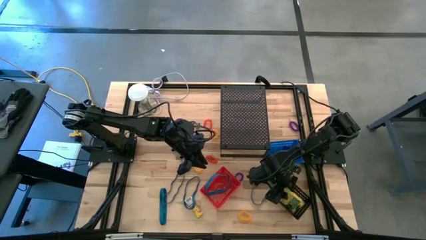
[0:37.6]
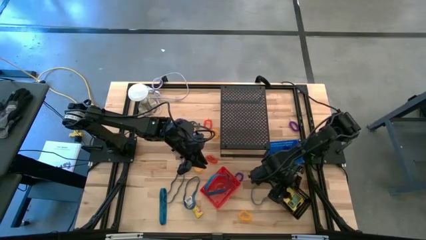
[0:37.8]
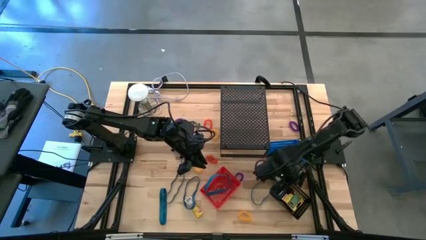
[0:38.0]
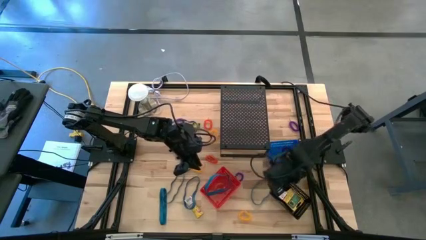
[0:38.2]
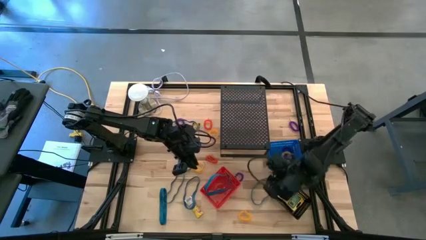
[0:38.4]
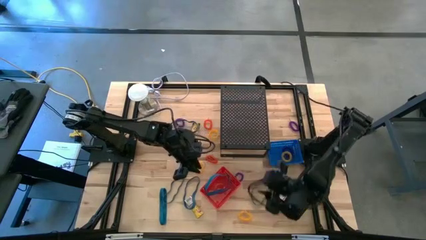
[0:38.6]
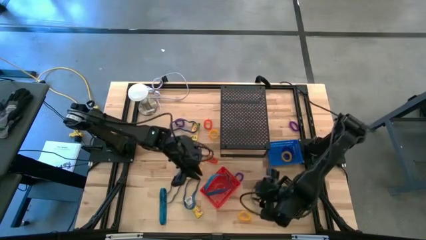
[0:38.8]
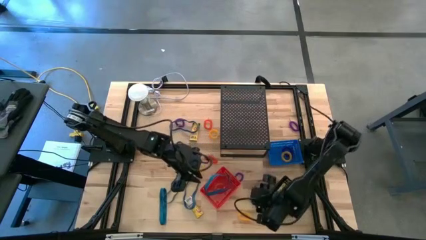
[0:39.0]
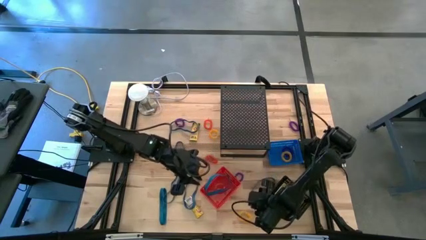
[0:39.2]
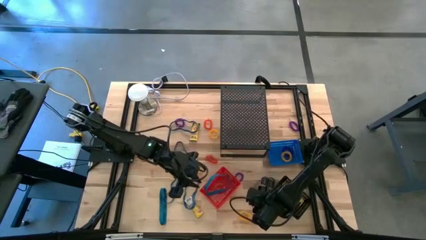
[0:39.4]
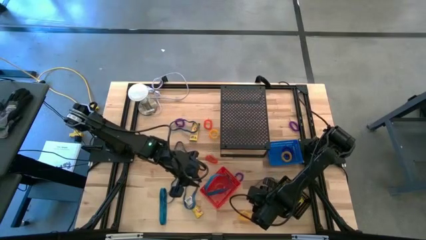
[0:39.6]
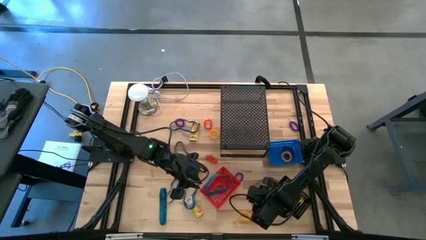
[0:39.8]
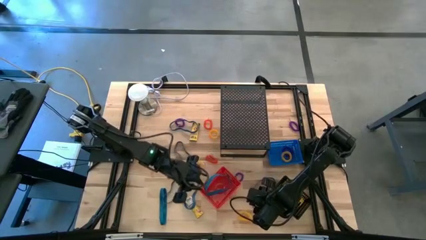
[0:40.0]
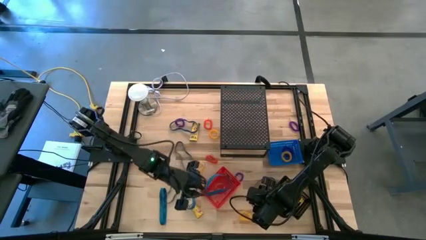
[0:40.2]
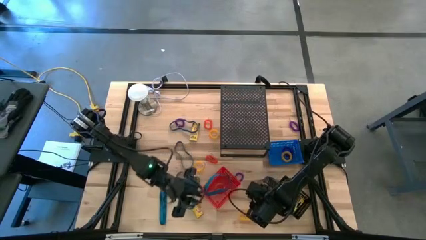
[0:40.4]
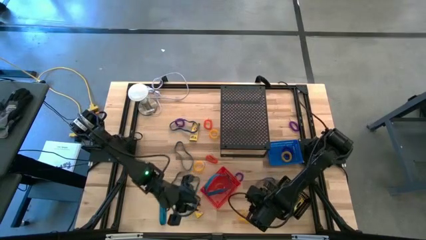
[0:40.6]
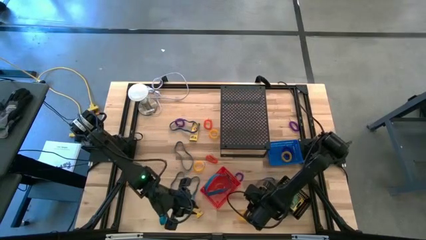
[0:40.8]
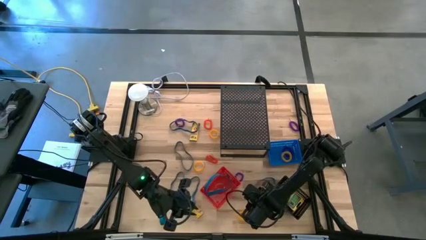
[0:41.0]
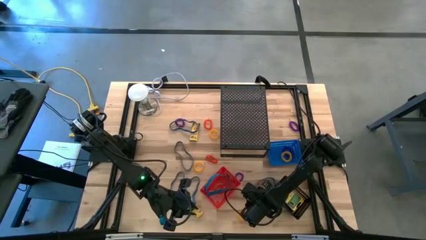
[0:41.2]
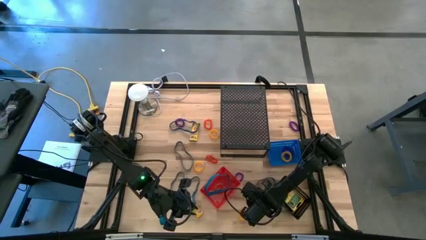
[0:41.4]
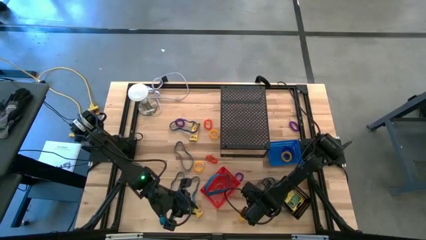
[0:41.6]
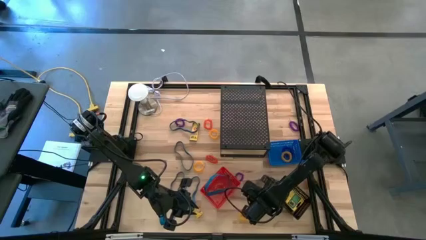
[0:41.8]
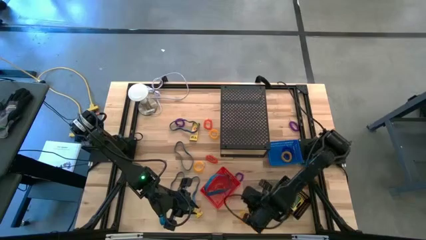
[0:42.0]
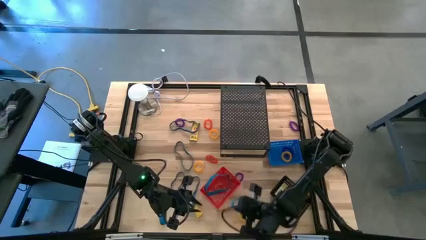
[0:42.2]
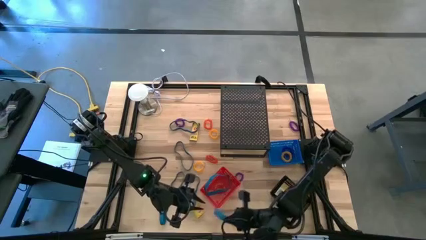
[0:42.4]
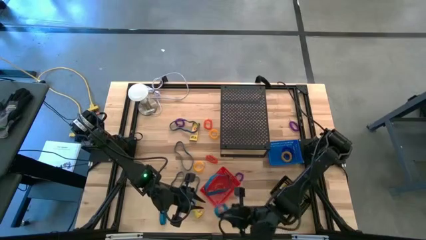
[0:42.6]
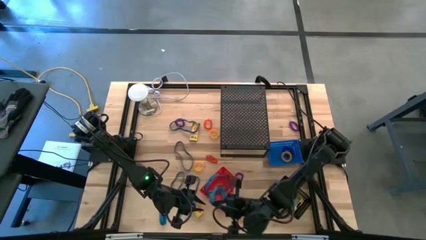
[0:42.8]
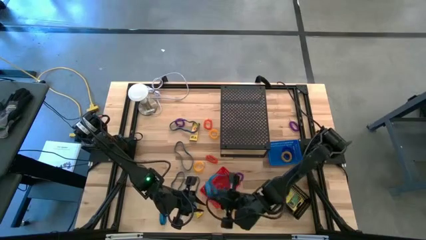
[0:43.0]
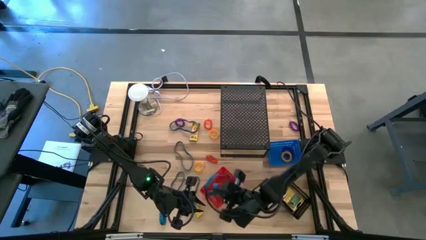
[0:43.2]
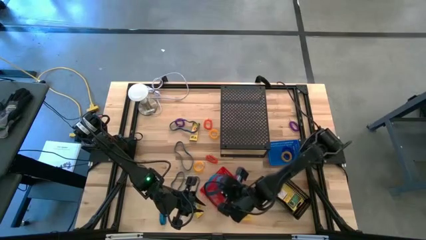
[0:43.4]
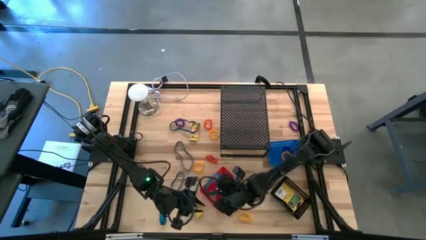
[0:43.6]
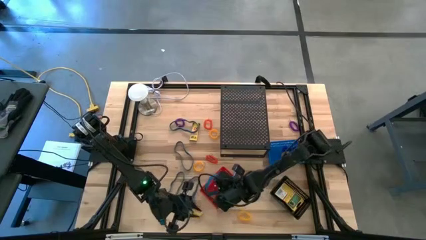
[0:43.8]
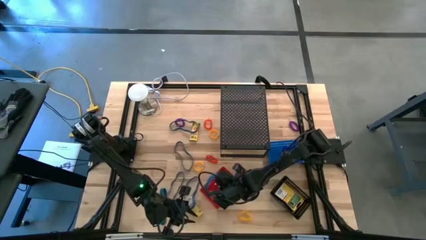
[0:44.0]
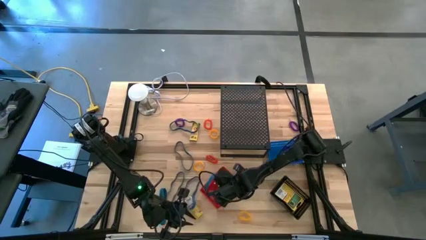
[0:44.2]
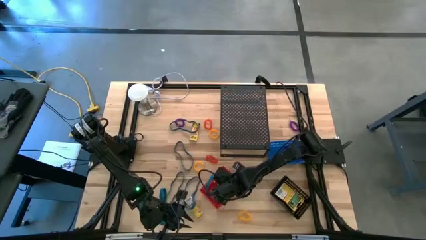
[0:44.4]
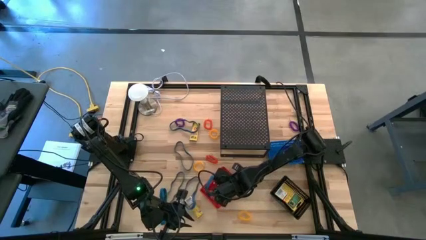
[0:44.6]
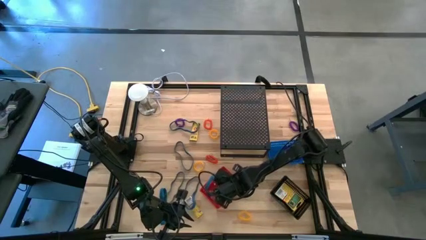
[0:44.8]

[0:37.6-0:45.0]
Task: Pick & Place Office Desk Supplies
Put the blue rubberband into the red basket

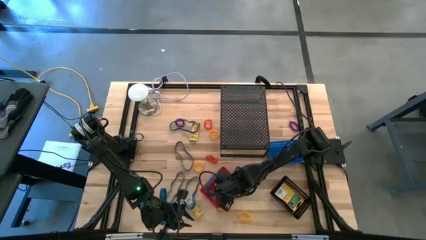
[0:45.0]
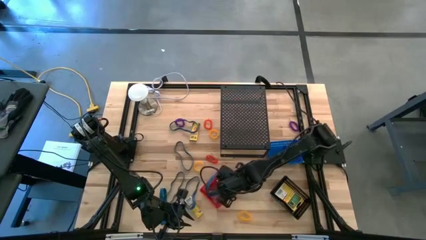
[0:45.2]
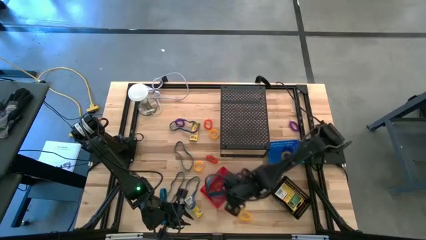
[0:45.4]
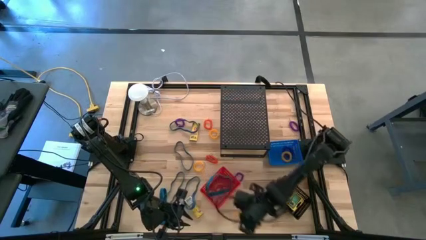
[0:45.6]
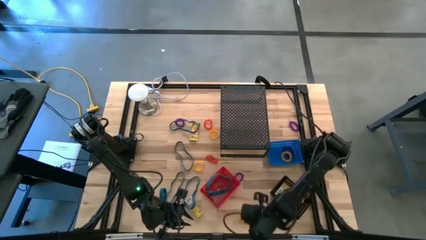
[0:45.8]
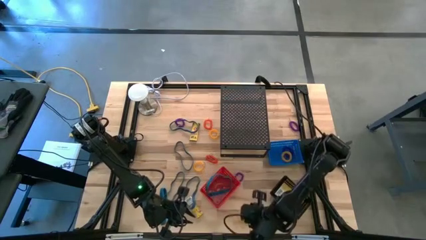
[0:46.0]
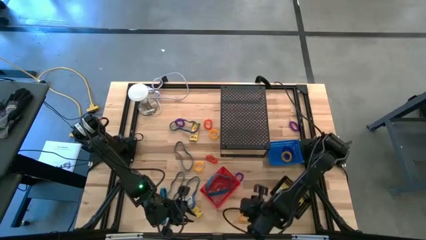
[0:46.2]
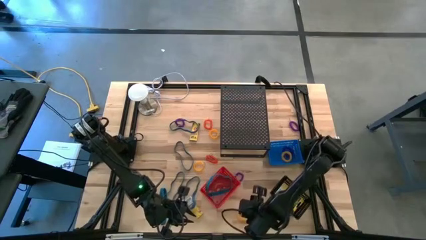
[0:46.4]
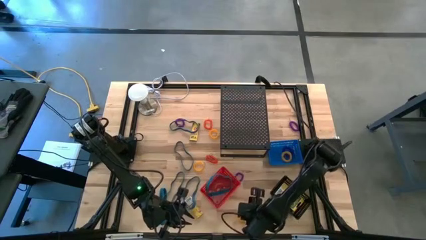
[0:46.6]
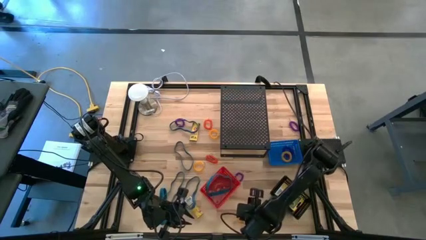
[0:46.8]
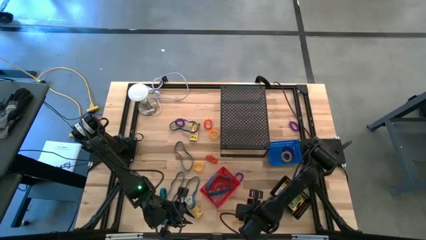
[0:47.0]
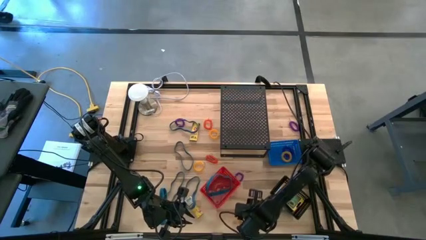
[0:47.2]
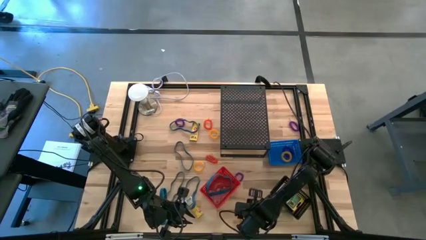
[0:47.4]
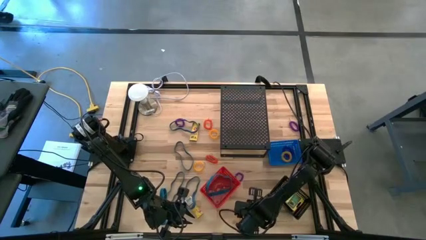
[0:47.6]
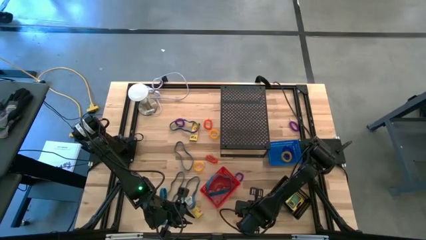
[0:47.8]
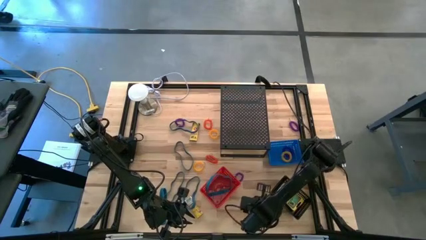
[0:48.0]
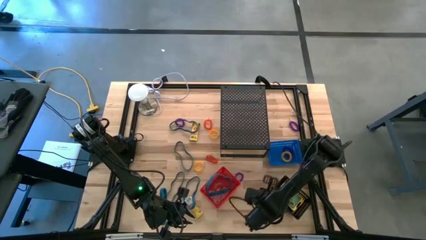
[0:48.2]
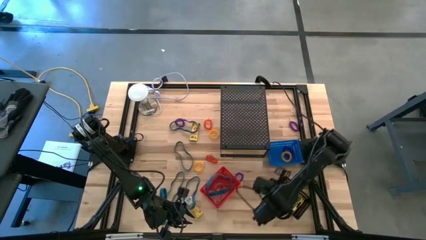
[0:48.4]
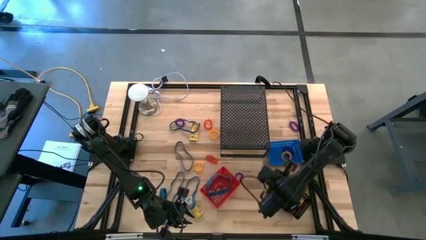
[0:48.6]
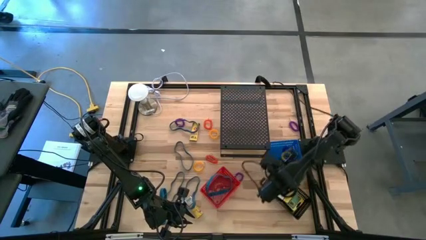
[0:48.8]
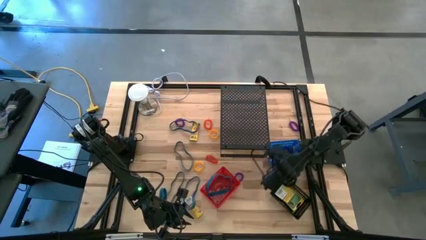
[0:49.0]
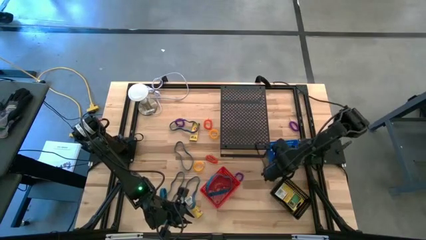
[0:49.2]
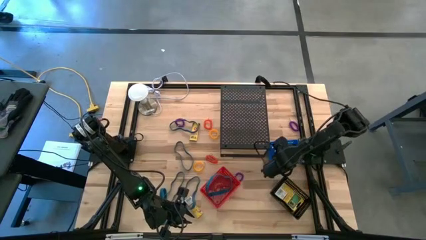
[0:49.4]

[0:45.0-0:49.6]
Put the yellow spring keychain into the blue basket
